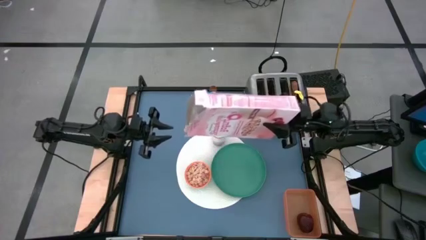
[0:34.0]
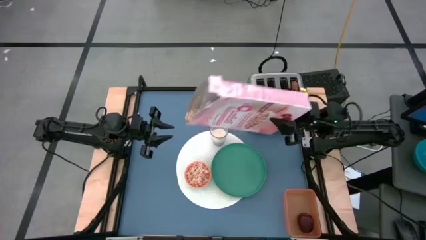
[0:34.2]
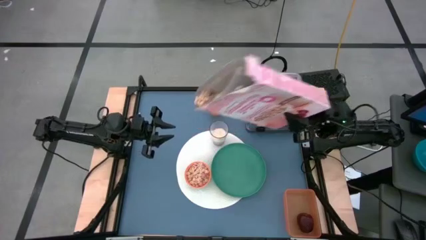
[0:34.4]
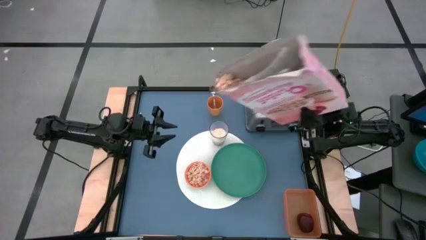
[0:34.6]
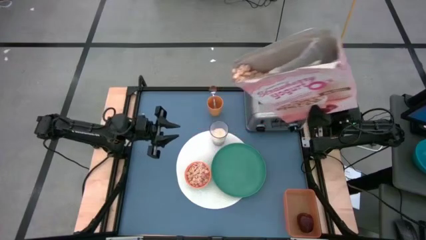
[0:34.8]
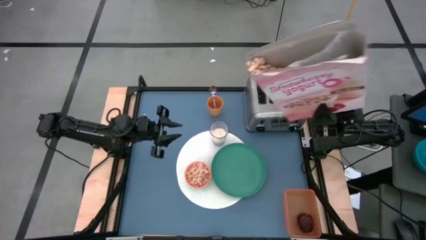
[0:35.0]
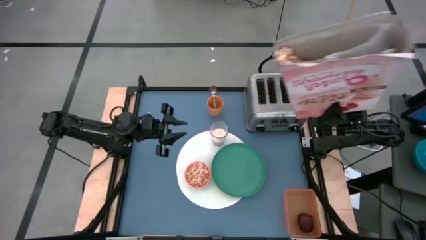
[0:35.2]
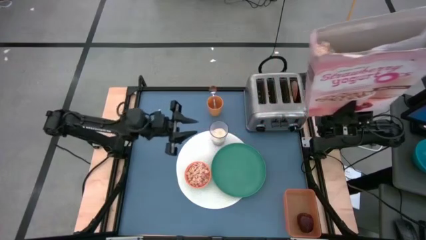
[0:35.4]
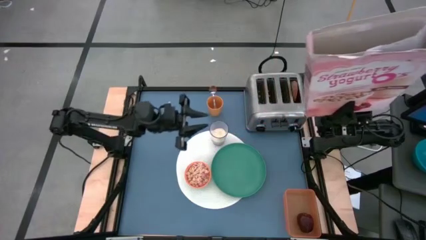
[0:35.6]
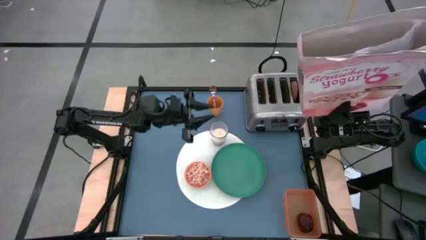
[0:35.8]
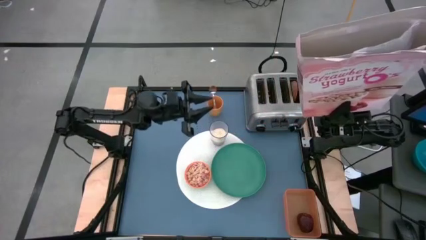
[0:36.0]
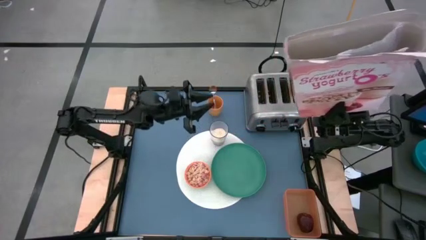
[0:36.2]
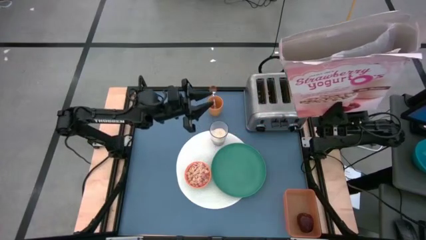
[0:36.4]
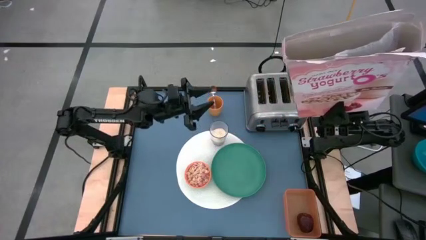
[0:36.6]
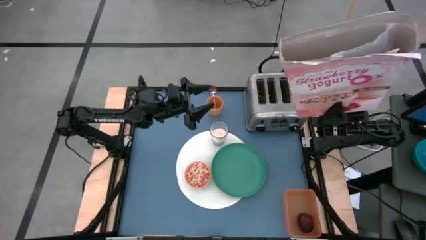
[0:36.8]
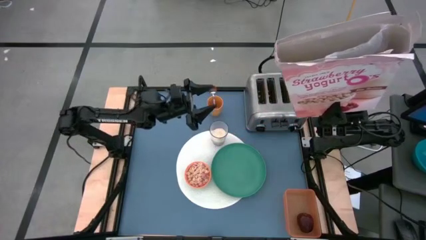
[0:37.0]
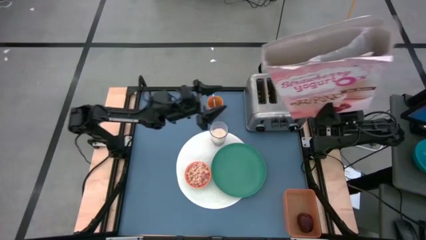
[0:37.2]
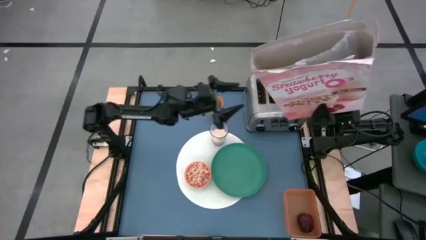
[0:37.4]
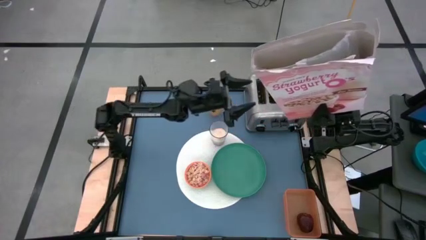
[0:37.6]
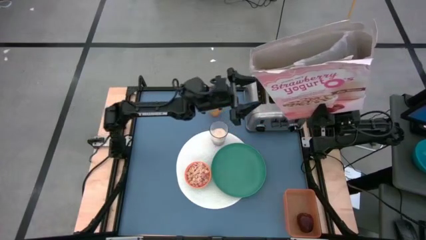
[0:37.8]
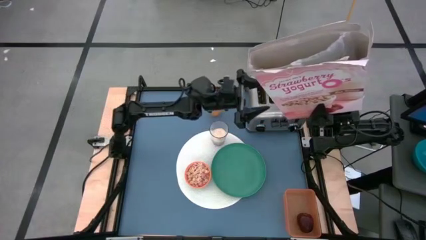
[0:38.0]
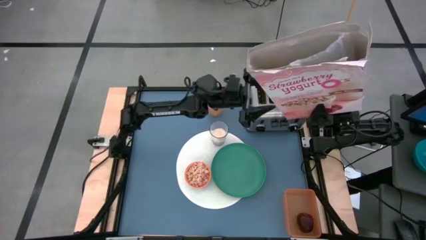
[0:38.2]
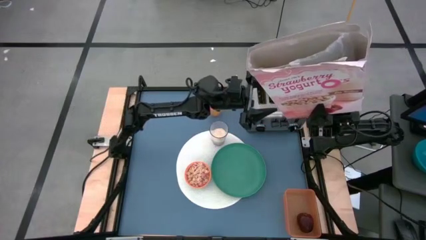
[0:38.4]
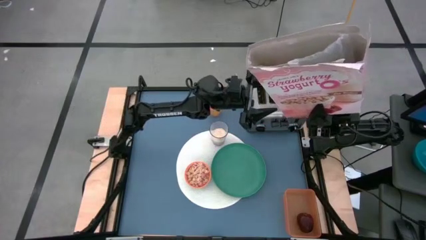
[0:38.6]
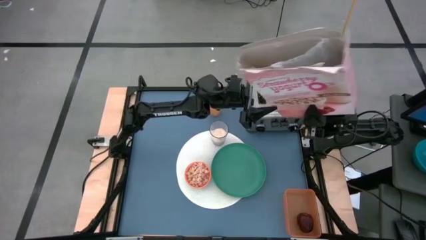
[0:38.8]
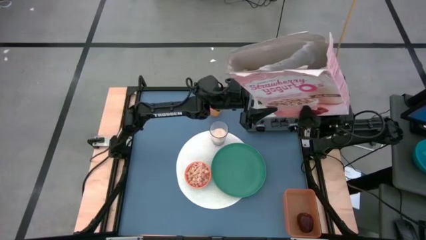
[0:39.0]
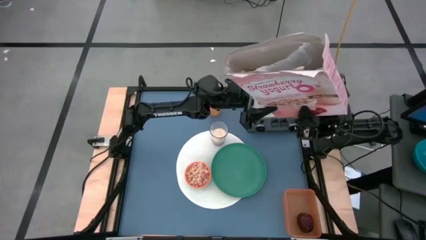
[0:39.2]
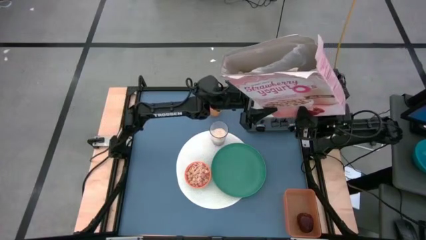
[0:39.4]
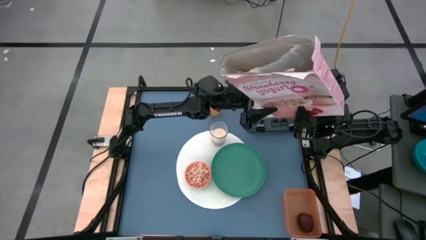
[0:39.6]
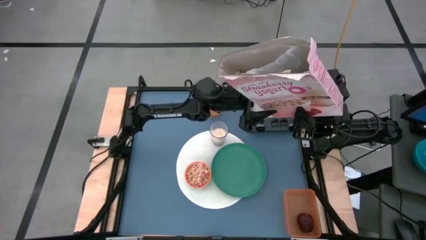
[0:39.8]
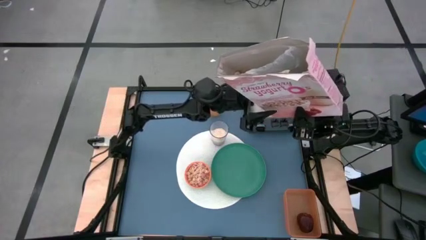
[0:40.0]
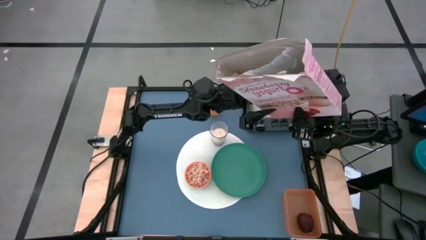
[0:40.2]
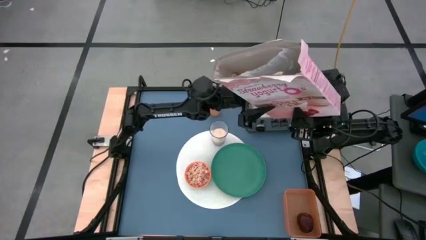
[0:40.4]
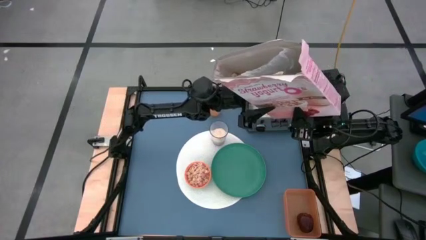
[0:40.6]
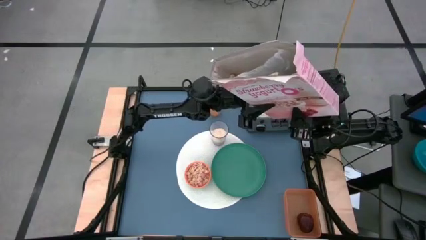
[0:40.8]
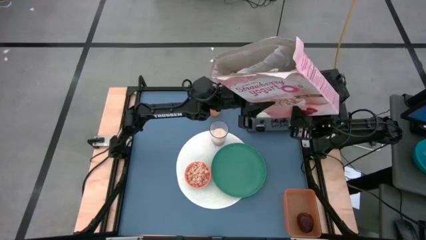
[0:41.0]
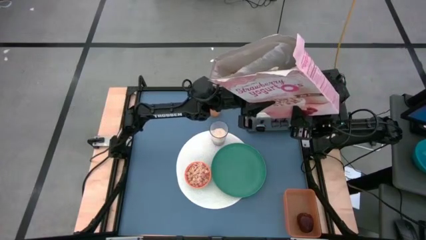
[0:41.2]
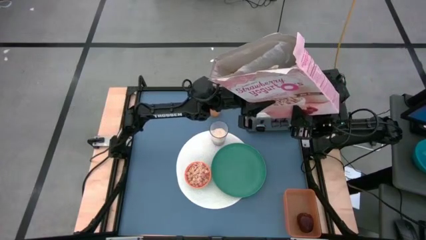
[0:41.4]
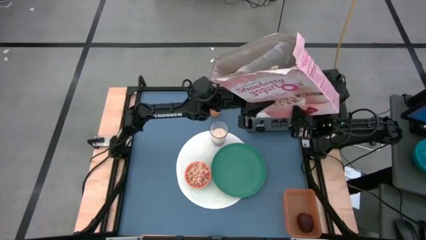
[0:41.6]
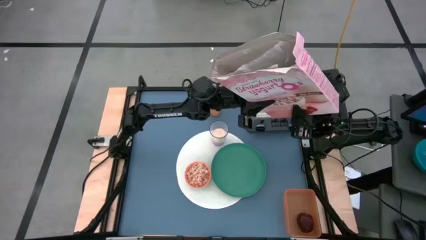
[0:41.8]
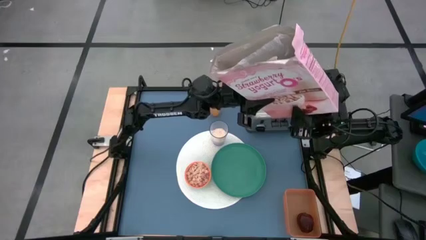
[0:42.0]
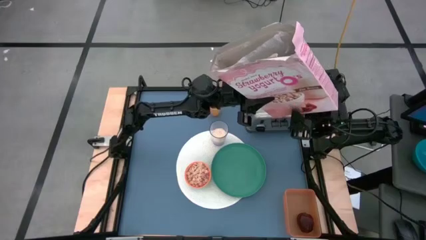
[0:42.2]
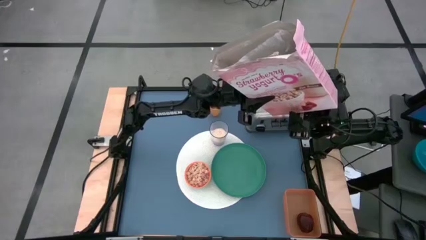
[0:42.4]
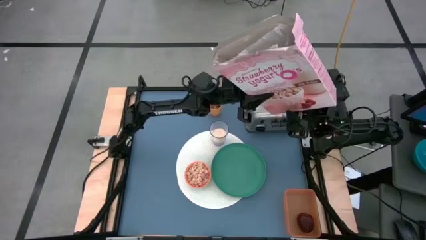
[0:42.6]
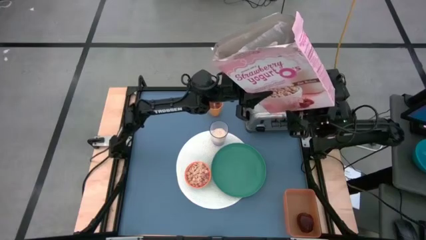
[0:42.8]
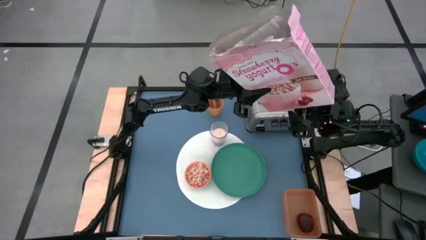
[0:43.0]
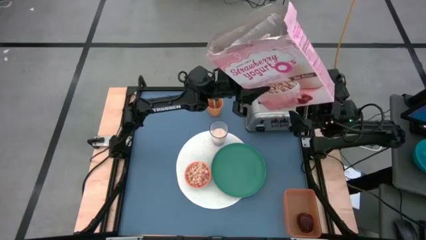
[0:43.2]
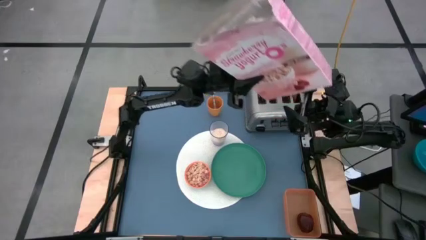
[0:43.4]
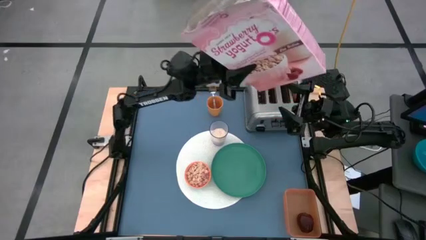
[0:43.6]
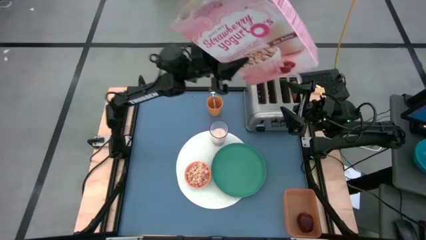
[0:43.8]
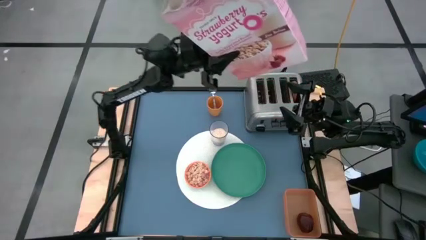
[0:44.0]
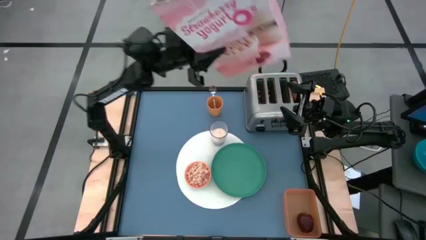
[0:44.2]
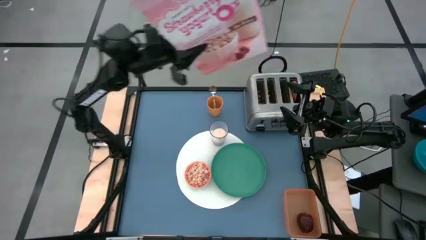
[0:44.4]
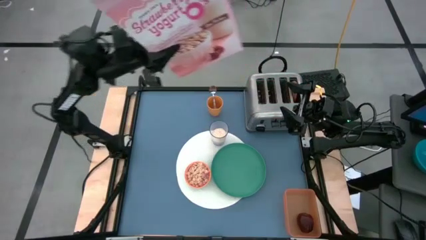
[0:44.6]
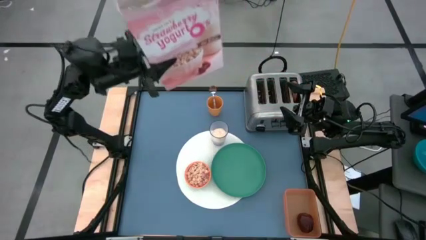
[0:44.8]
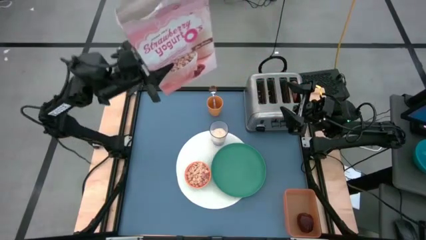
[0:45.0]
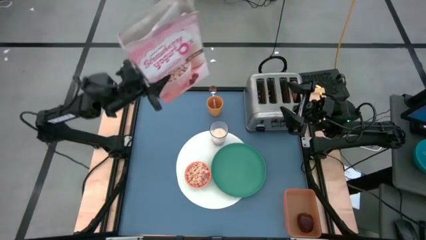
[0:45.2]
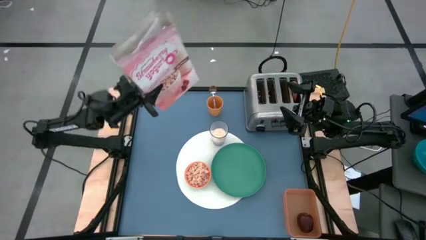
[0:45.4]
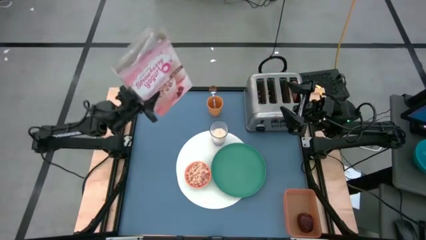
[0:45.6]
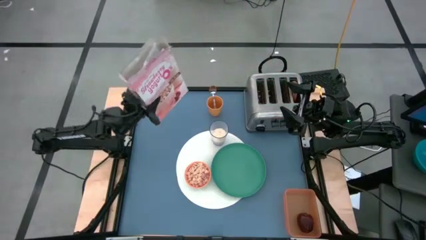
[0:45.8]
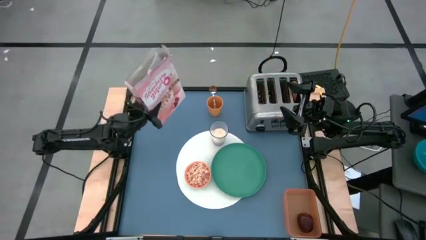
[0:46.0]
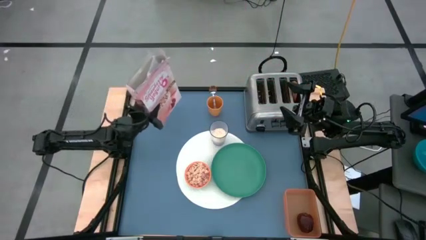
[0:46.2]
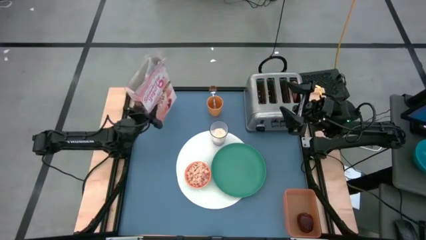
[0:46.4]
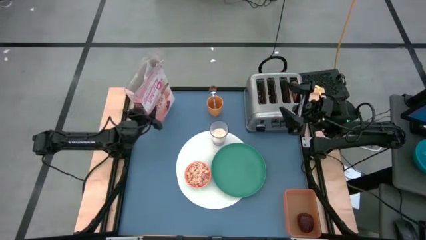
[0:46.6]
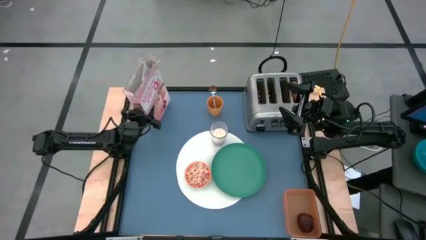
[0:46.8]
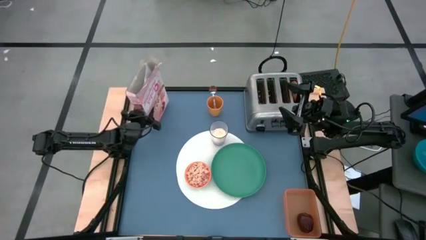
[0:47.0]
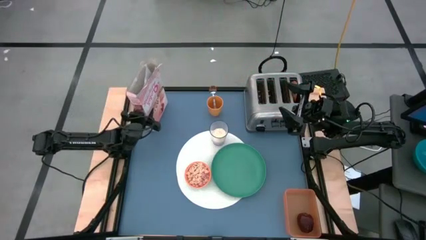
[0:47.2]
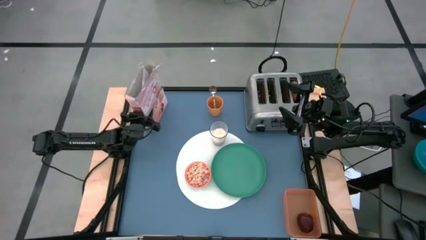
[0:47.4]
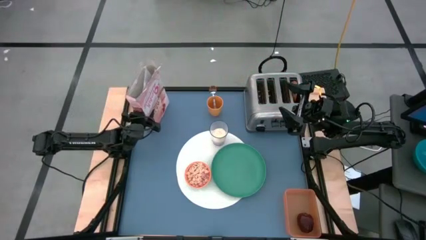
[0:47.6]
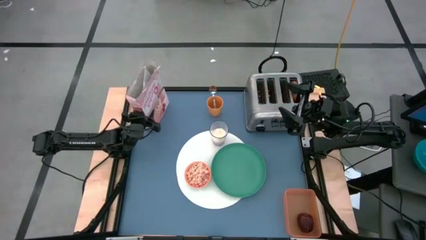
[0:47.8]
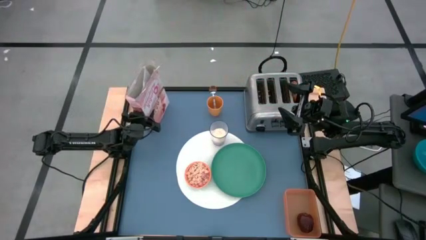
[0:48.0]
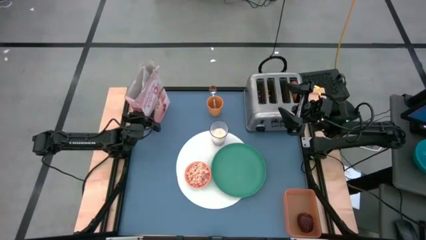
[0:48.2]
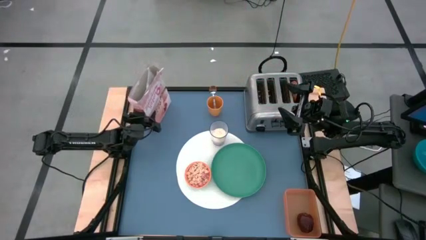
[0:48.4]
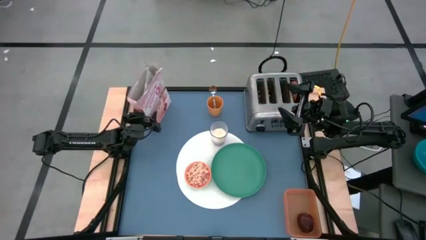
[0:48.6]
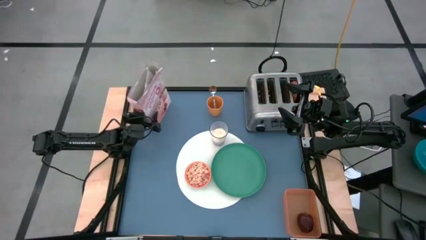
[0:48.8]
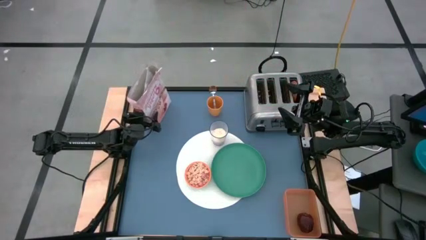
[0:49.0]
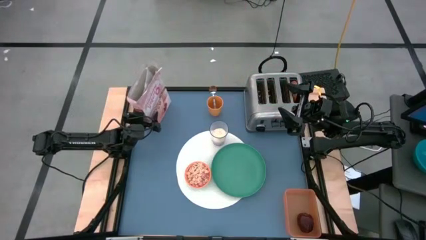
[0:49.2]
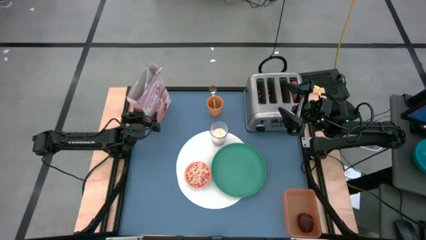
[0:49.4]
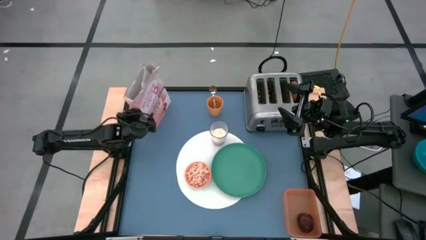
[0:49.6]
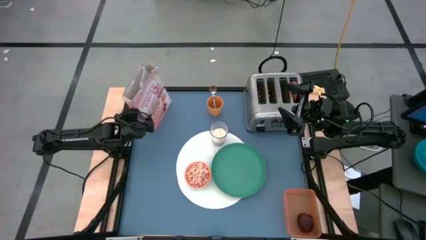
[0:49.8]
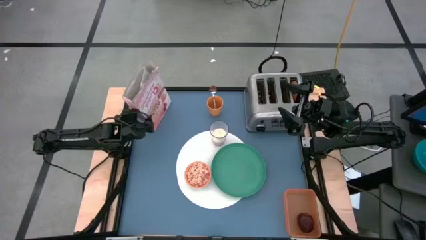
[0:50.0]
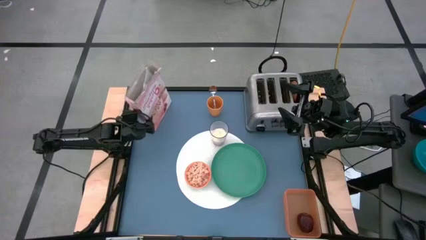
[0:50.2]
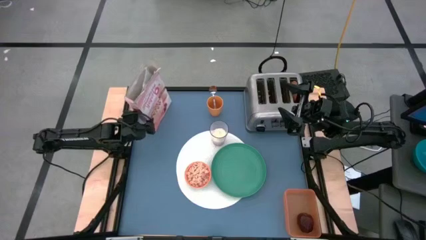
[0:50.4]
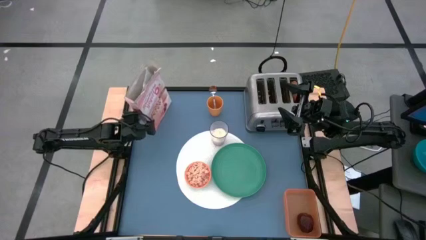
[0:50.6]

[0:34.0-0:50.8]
Task: Arrange a breakfast setting
Pour the cereal into the orange bowl
